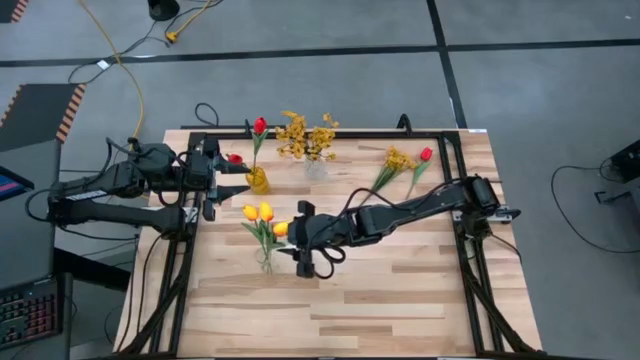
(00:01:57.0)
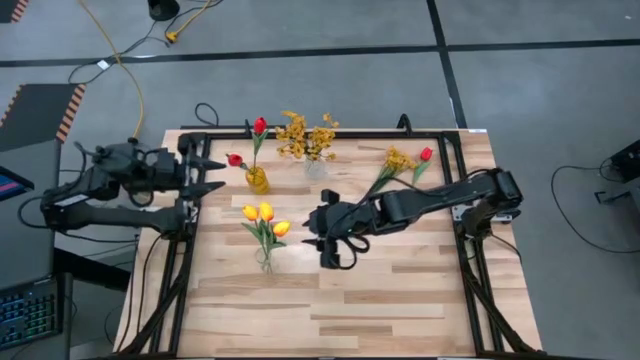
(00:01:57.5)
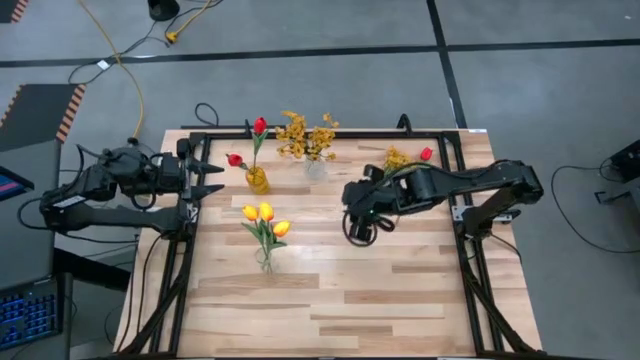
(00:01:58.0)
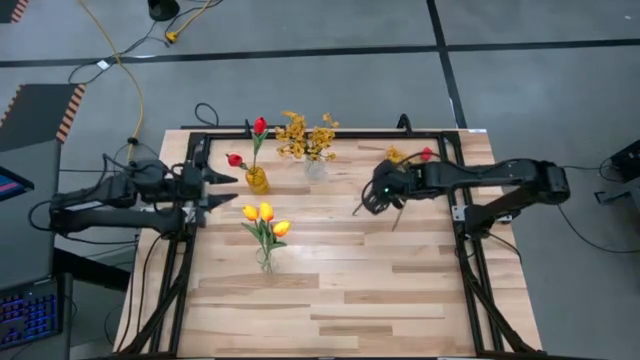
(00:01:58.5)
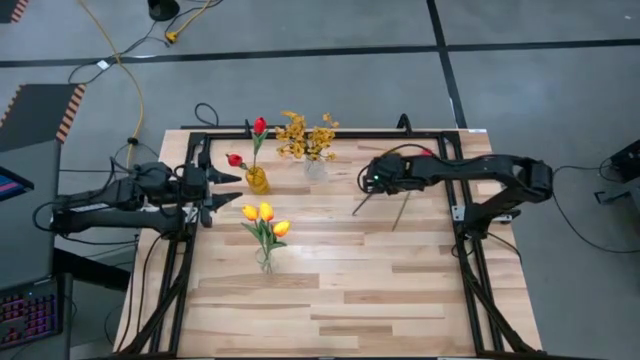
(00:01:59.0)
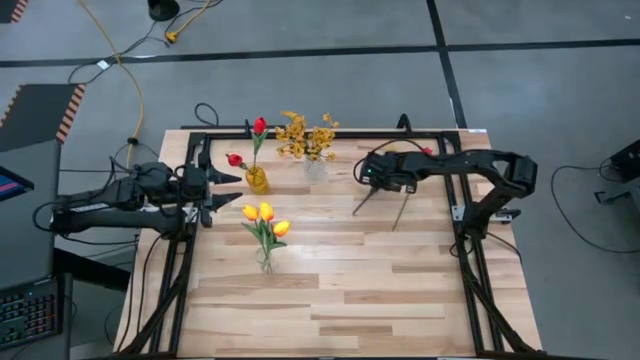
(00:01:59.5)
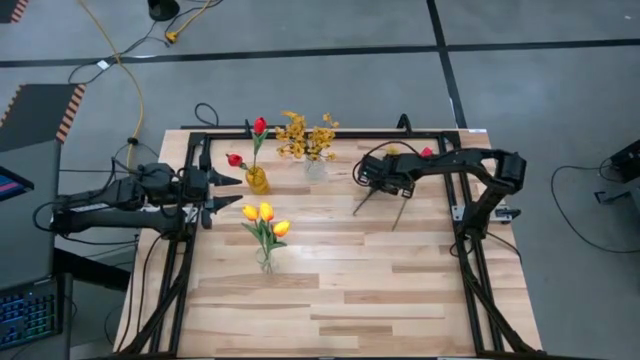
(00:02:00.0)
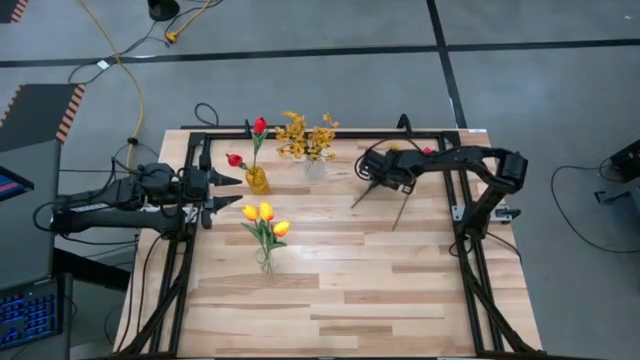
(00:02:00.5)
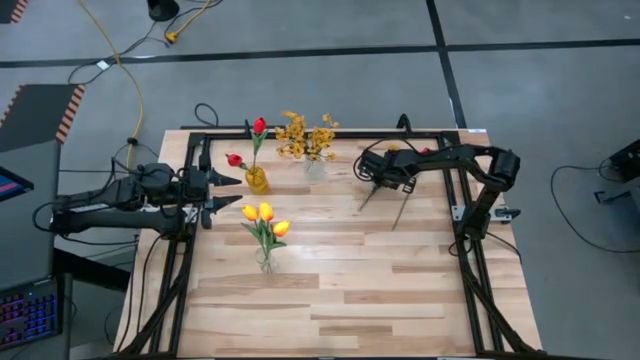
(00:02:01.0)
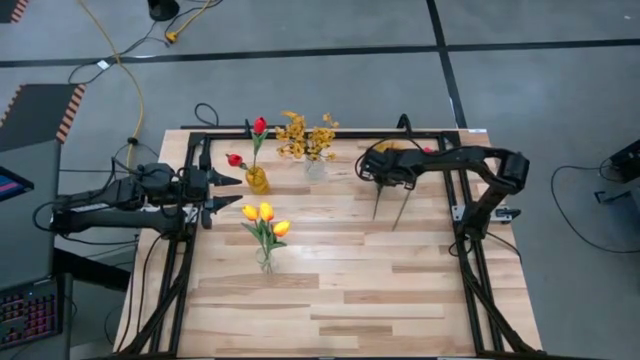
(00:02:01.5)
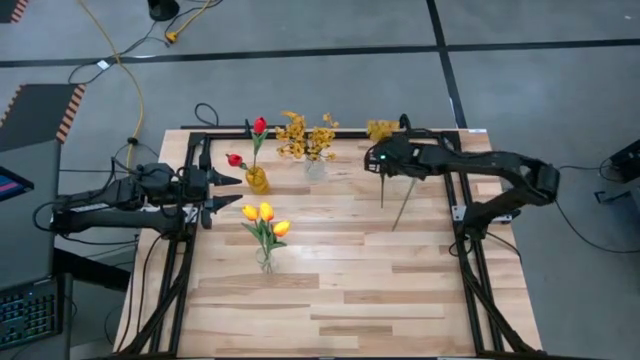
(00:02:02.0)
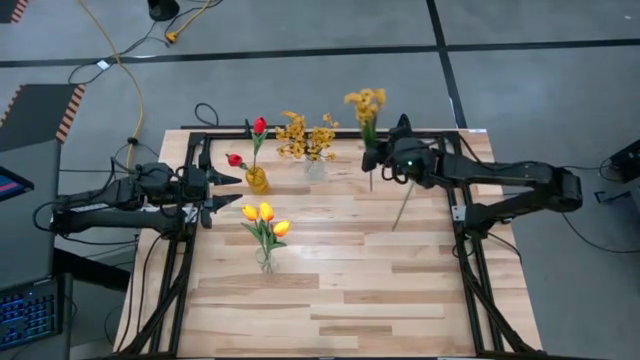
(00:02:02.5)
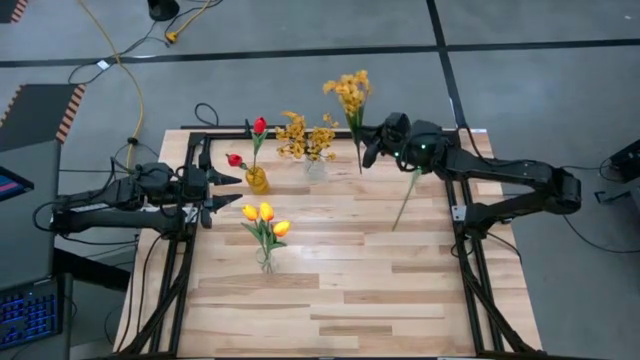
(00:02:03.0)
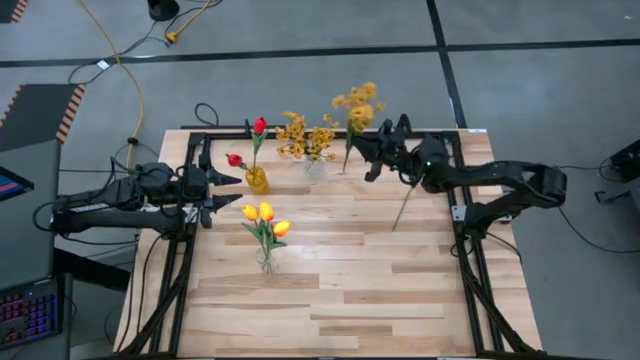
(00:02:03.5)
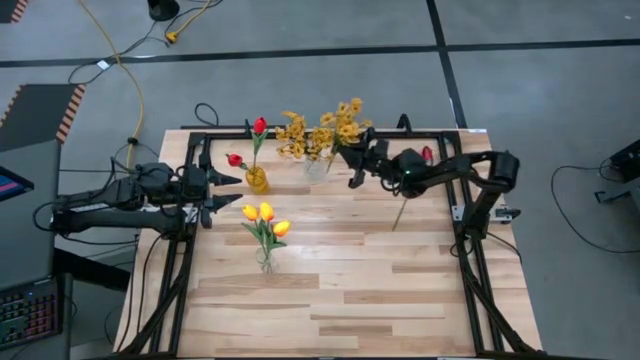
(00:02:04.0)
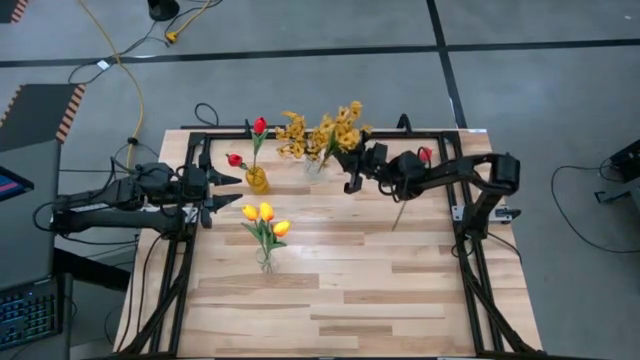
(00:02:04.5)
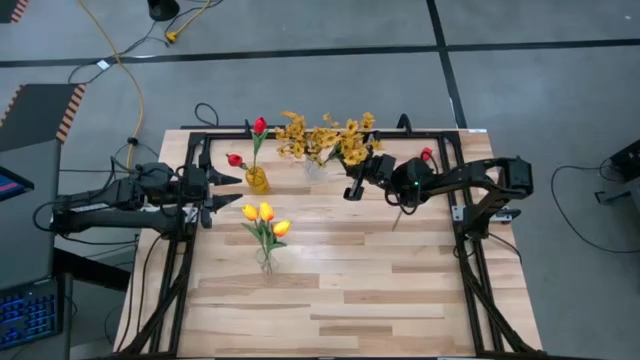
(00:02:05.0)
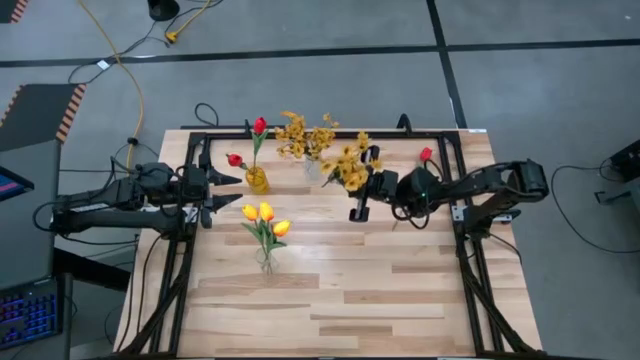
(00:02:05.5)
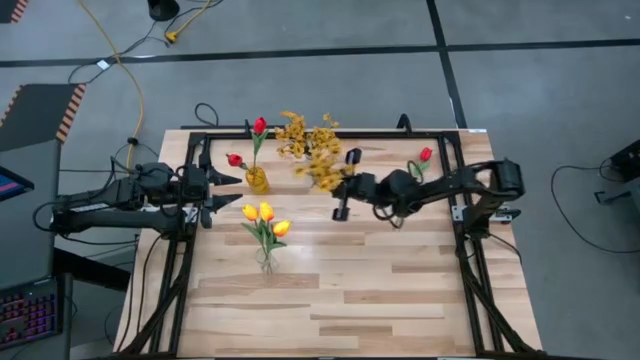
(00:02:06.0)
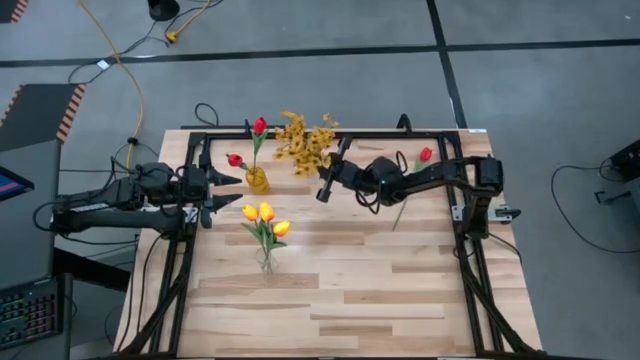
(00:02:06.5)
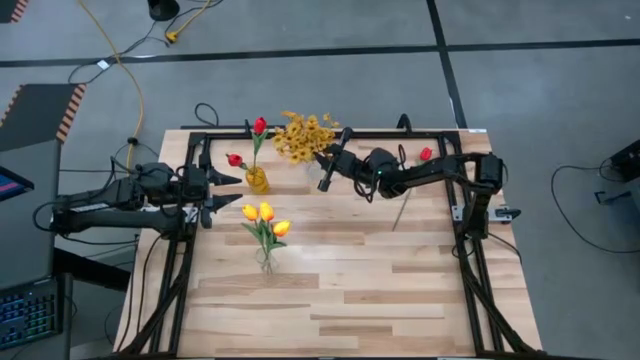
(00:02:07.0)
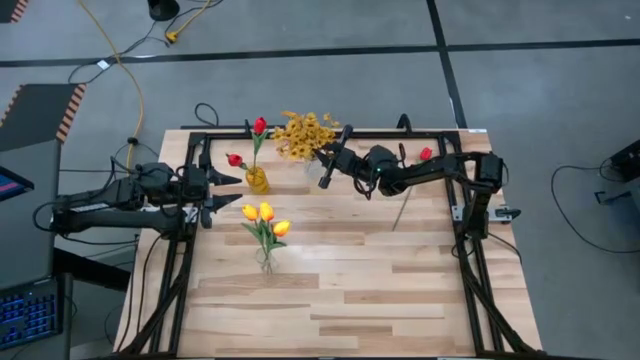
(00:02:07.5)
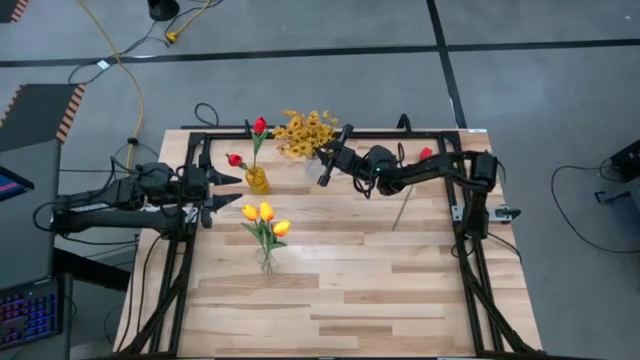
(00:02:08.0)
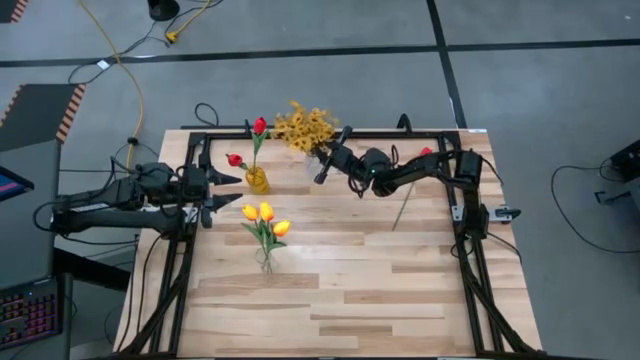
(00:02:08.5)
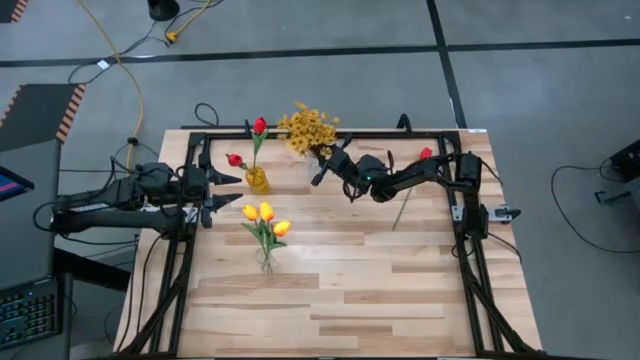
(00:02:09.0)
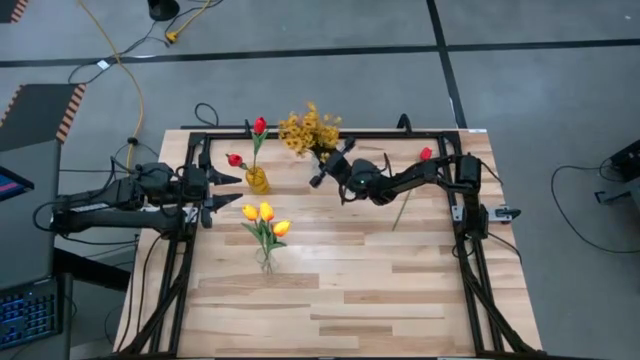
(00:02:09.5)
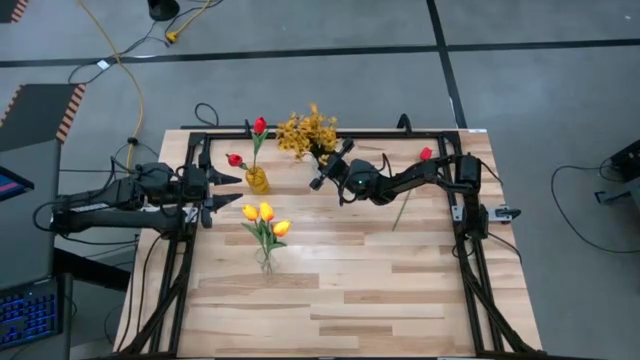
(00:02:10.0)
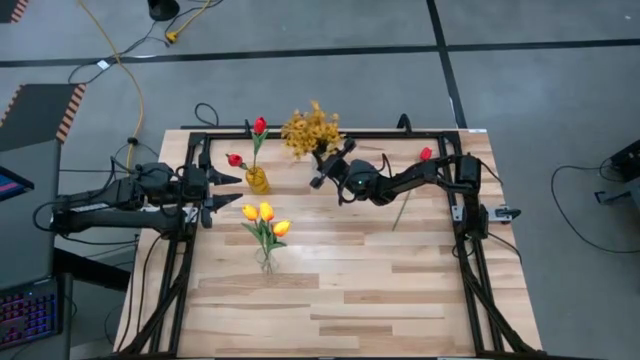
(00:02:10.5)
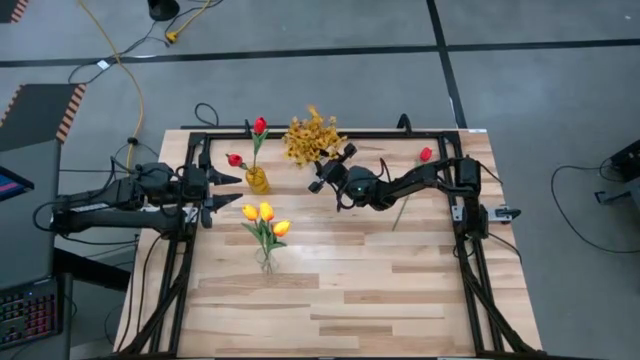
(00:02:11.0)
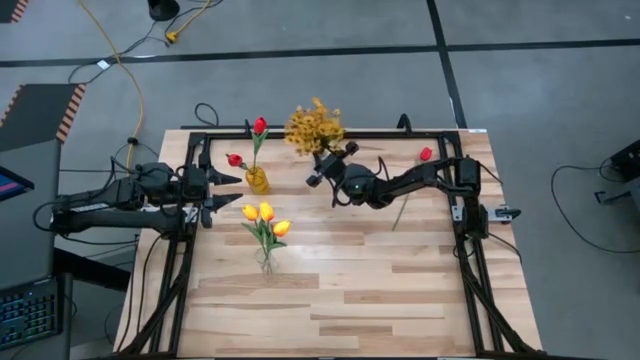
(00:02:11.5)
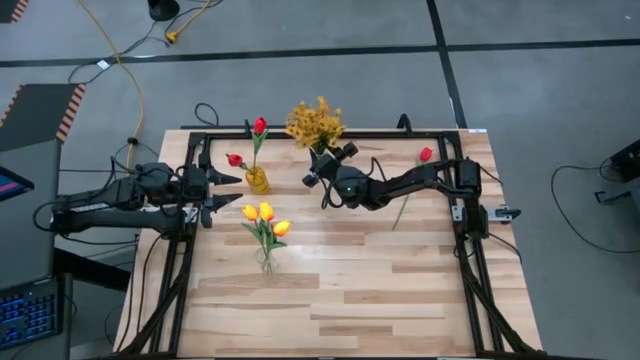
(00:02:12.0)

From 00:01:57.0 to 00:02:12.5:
Task: Sort flowers into vase by color
Put the yellow flowers into the top transparent vase

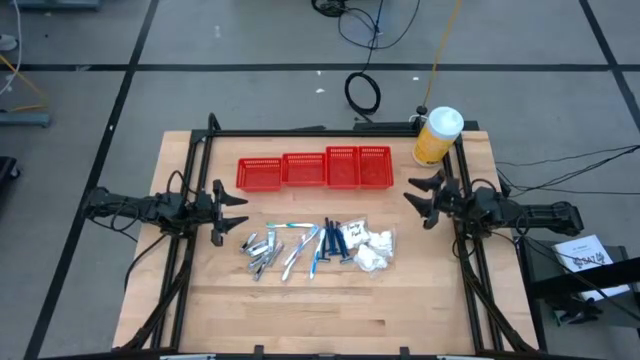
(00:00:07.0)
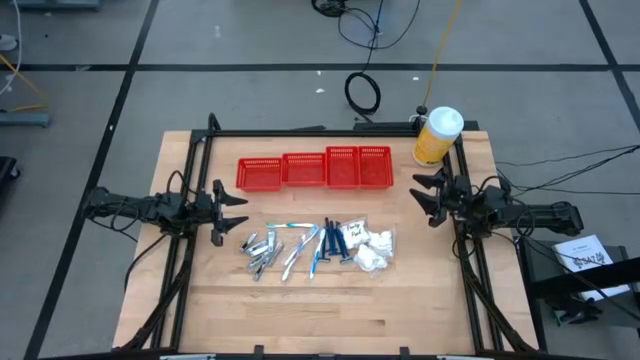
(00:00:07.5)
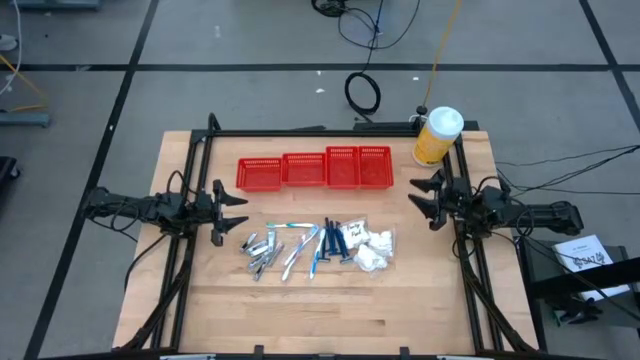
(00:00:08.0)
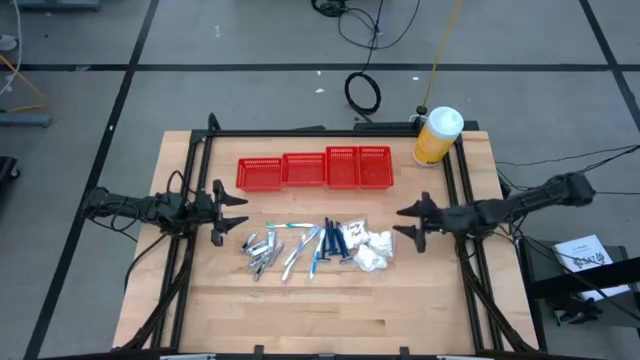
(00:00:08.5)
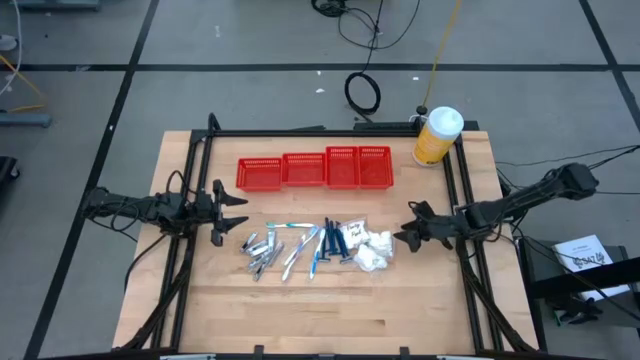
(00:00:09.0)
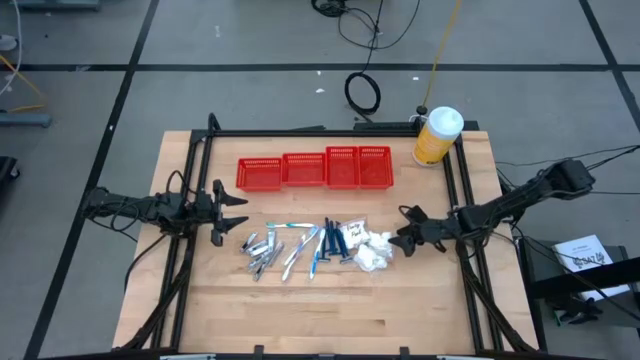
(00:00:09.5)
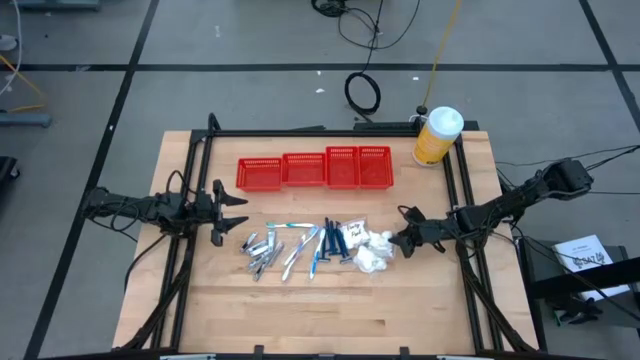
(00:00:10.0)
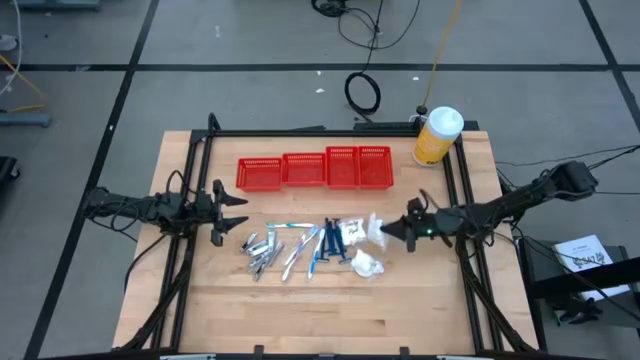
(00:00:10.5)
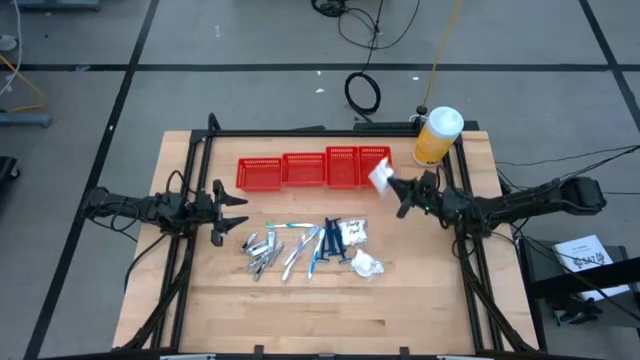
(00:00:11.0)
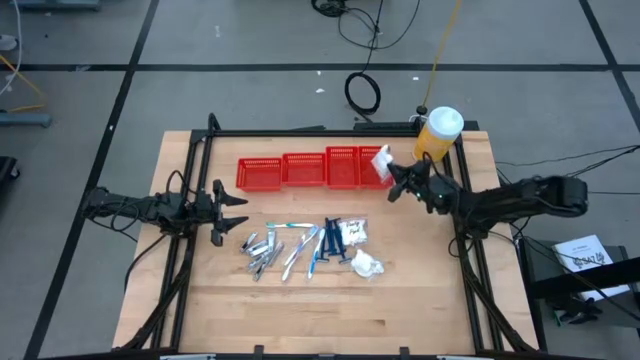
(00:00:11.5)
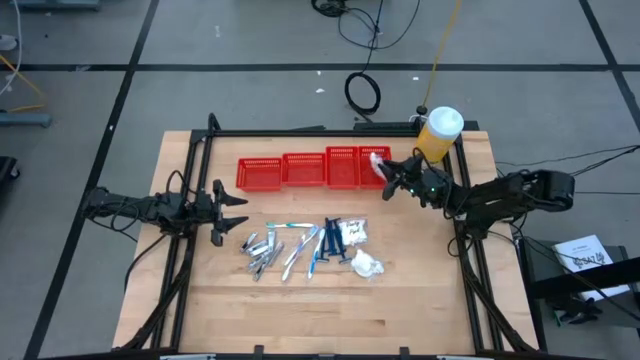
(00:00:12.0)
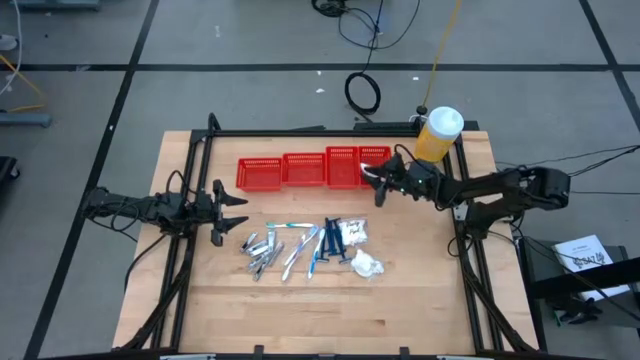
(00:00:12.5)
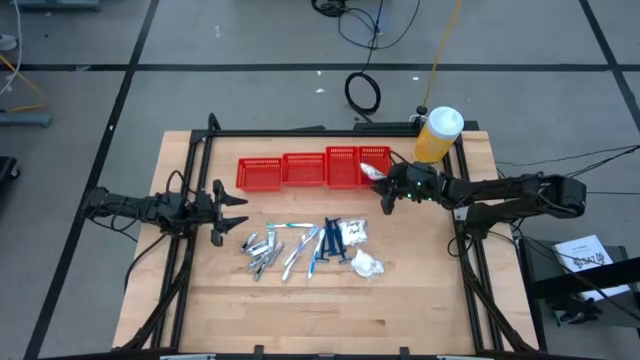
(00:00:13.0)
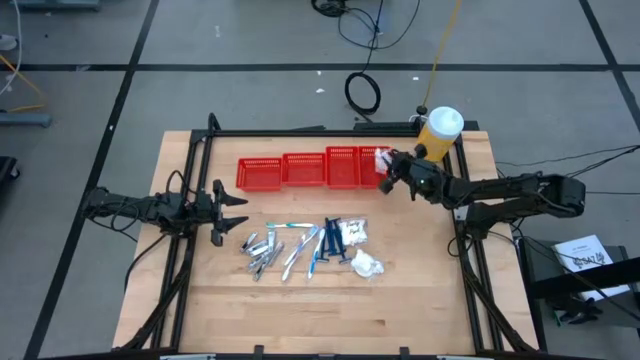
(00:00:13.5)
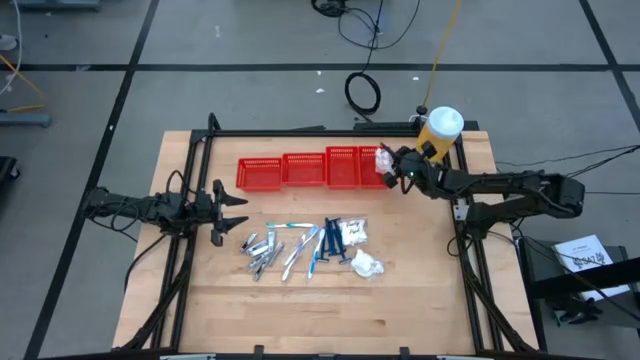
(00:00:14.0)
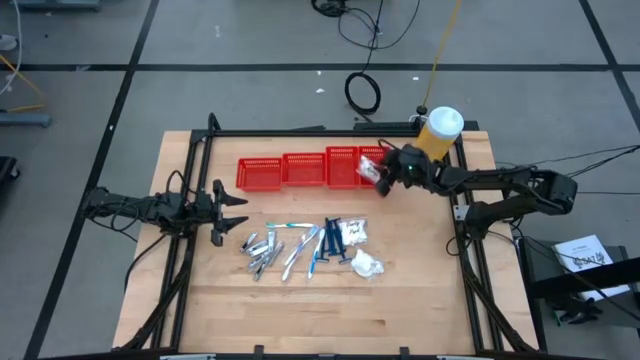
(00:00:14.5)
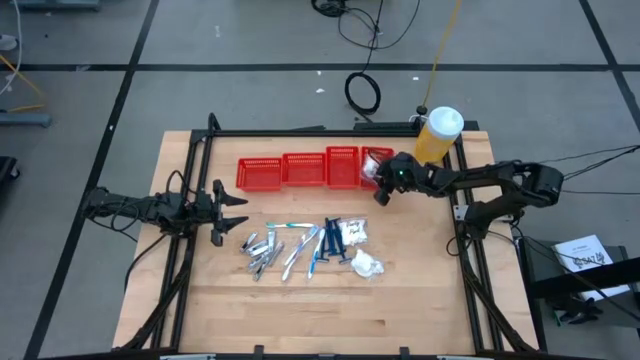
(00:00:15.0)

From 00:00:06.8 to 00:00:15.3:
Task: Pick & Place Travel size toiletries
Put the right vanity pack into the vertical right red bin
